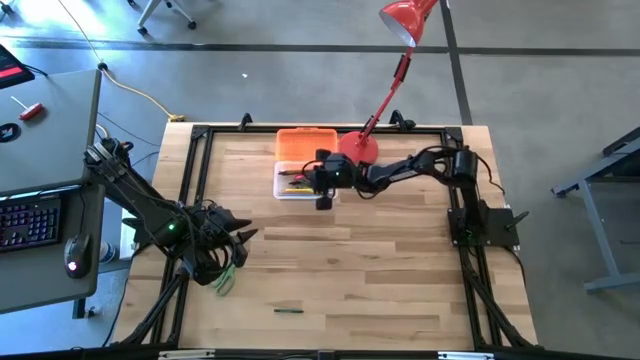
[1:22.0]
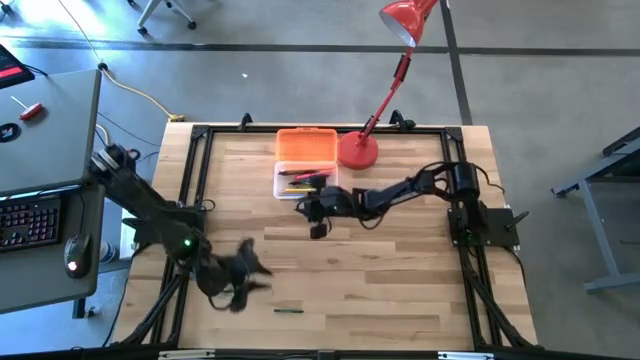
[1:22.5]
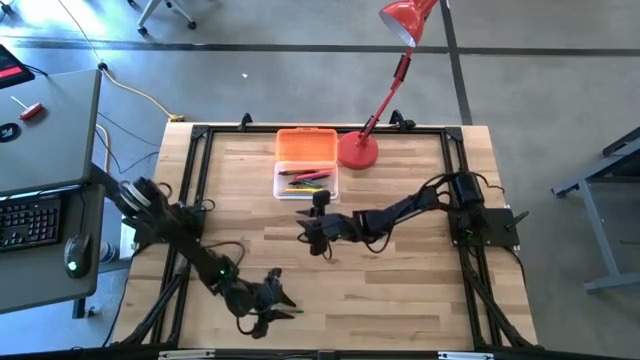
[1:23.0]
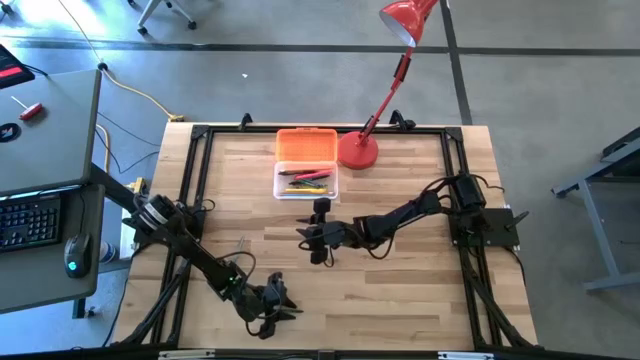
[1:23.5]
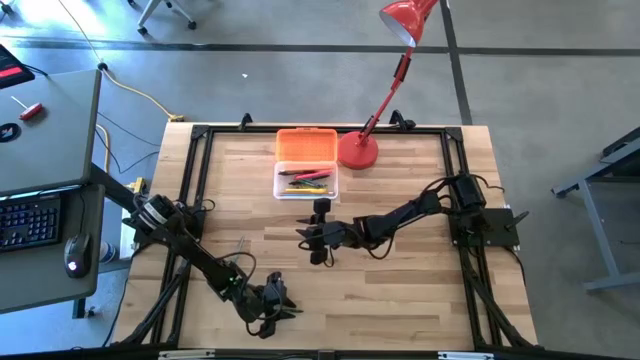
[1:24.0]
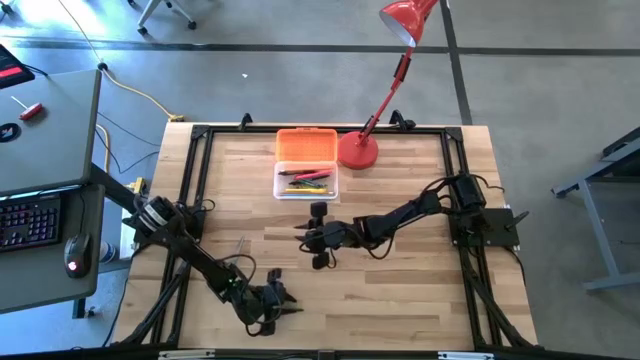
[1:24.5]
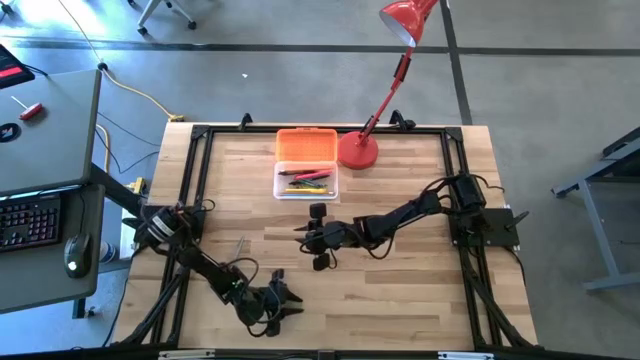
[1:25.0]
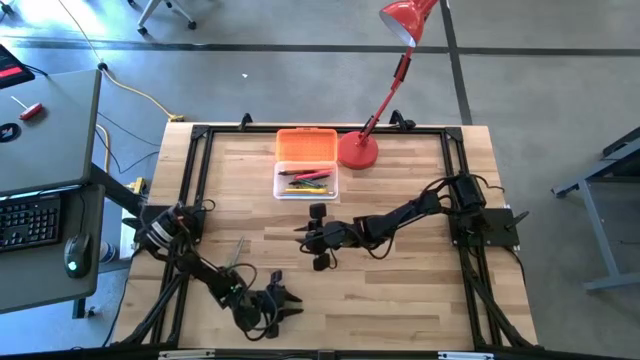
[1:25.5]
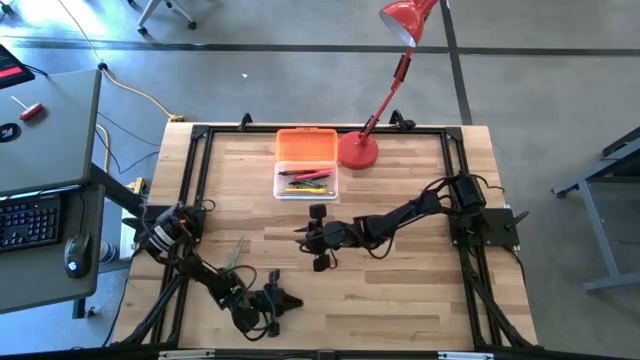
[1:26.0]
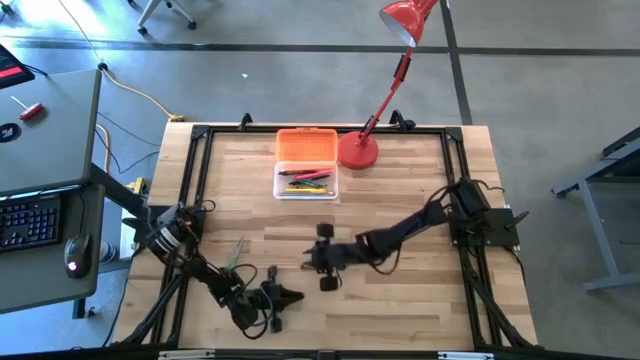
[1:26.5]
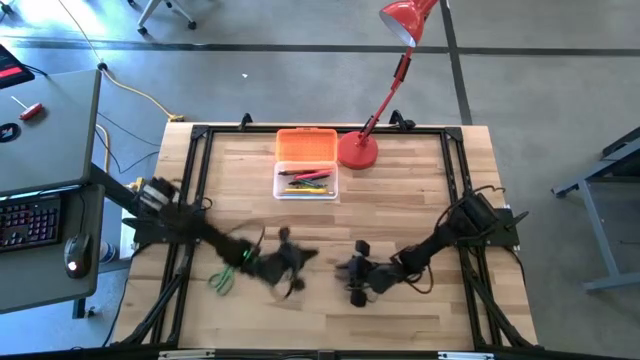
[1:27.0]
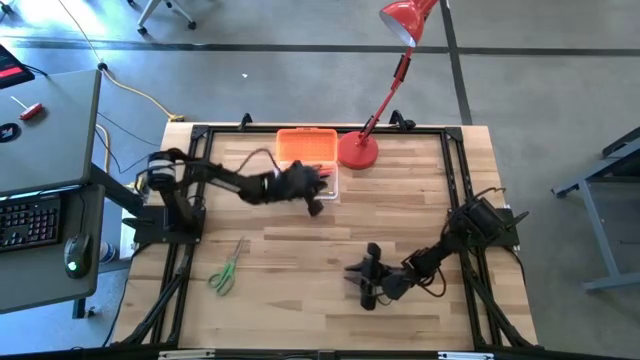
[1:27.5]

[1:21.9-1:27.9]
Task: Pick & place school supplies into a supply box
Put the dark green crayon into the orange supply box

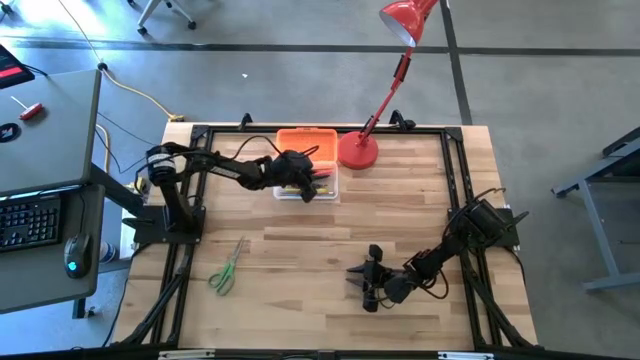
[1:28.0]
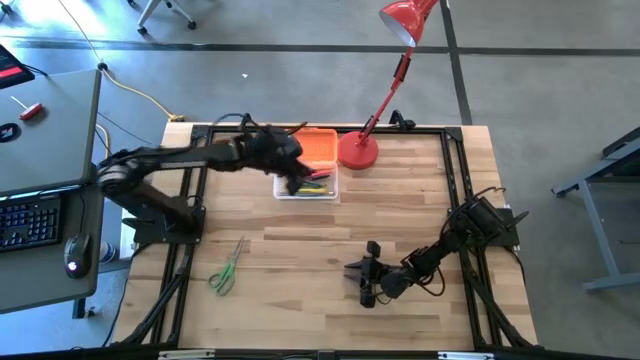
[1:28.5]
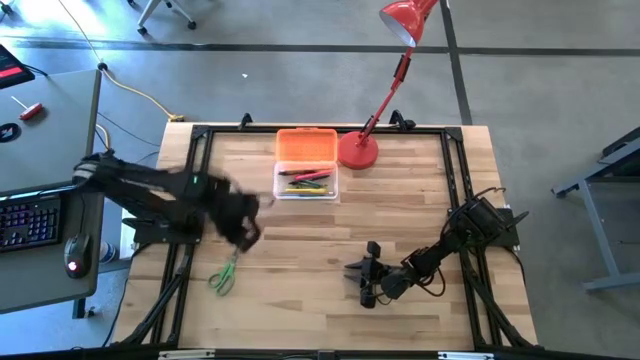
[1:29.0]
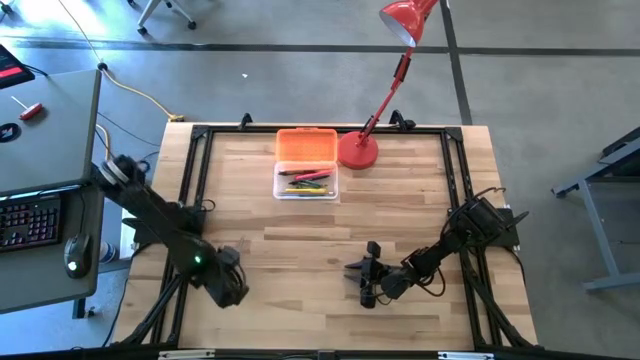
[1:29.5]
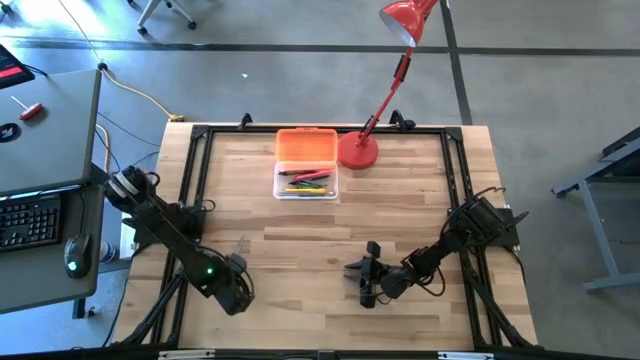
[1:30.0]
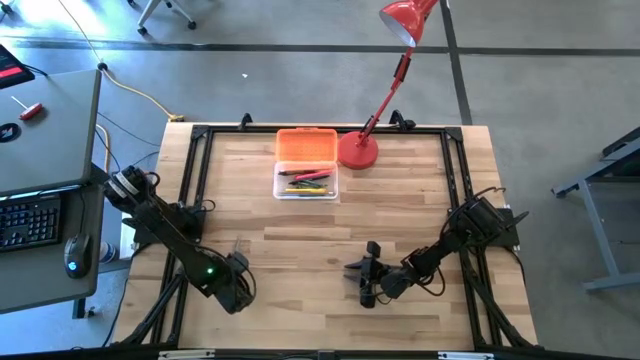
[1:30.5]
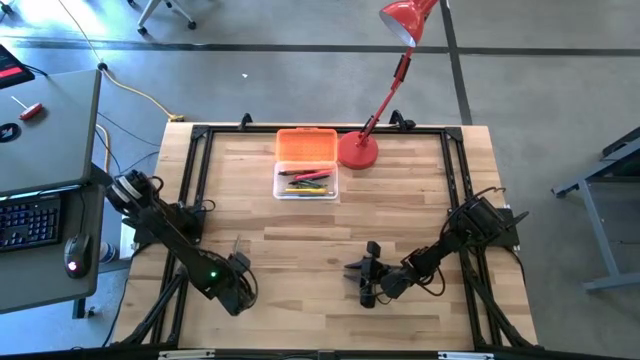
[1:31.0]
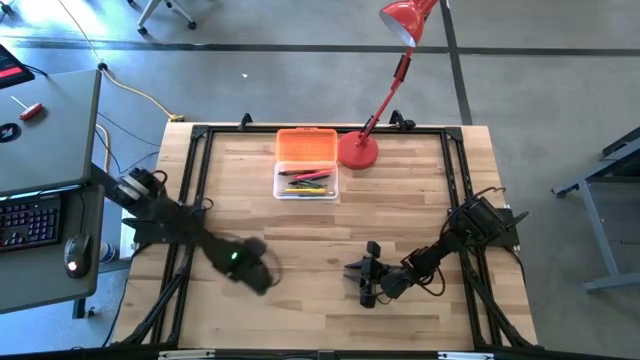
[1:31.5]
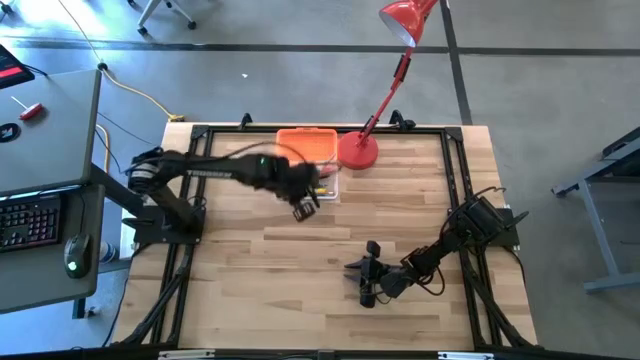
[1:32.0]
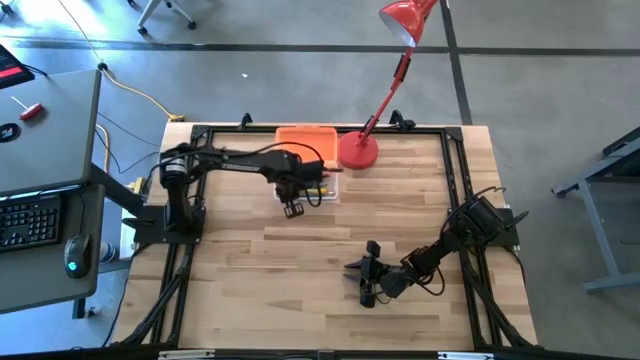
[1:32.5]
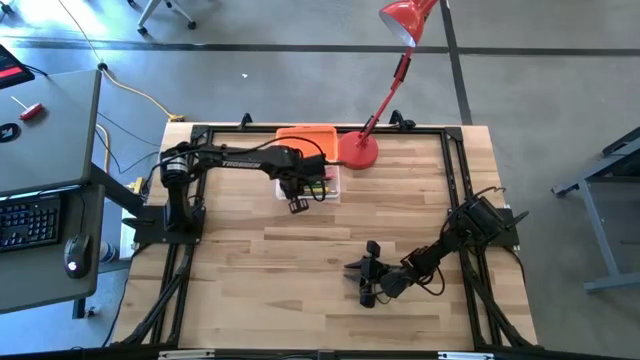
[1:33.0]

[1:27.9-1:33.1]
Put the green scissors into the orange supply box

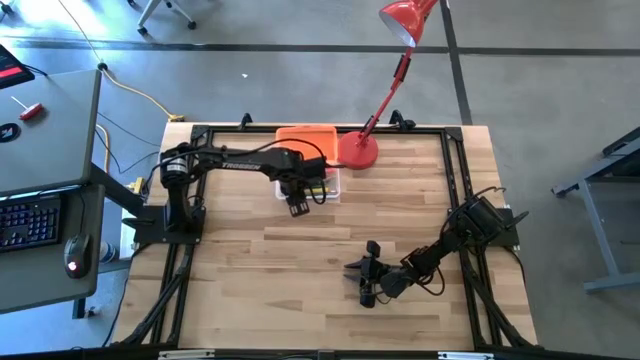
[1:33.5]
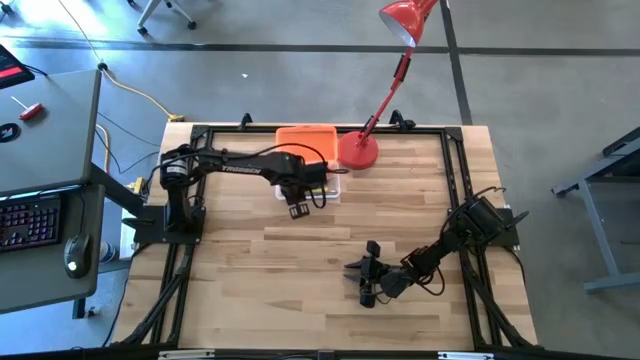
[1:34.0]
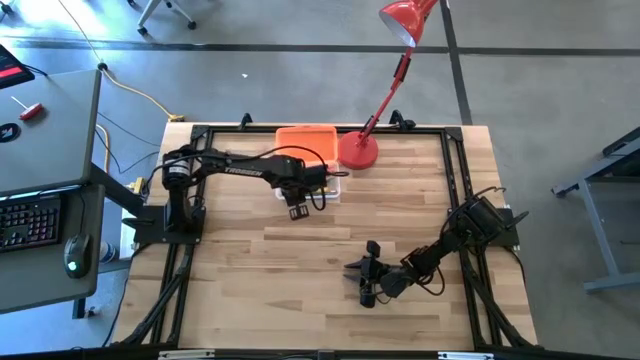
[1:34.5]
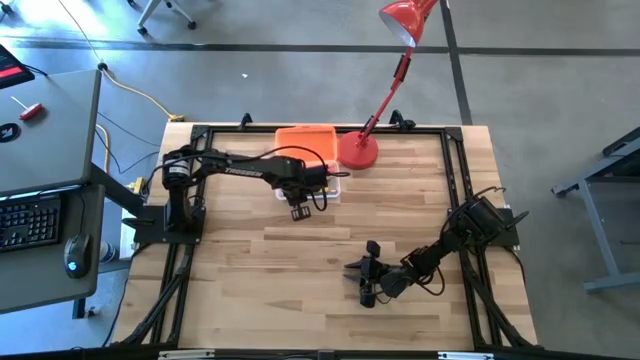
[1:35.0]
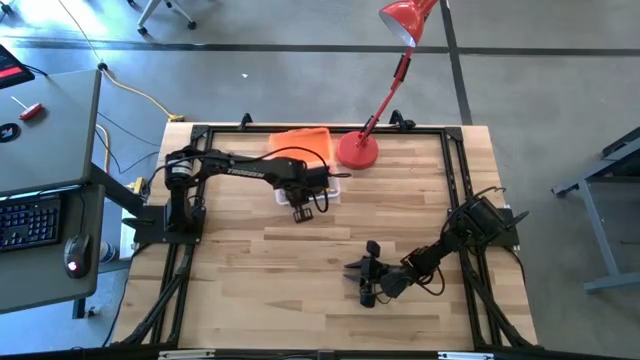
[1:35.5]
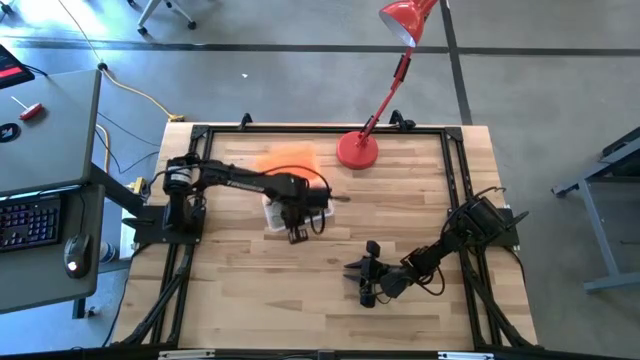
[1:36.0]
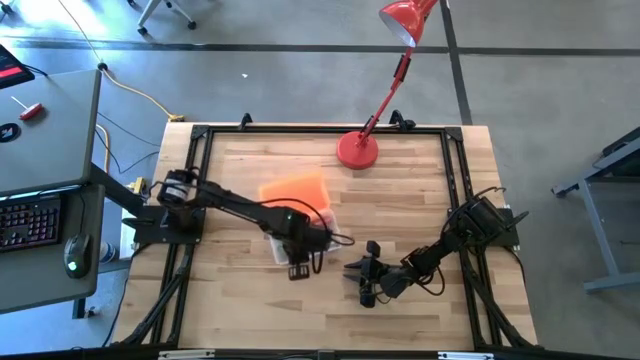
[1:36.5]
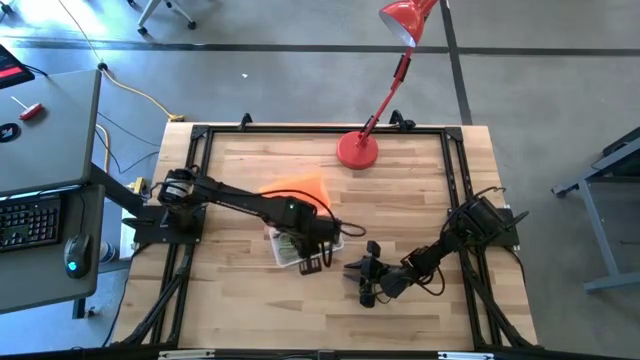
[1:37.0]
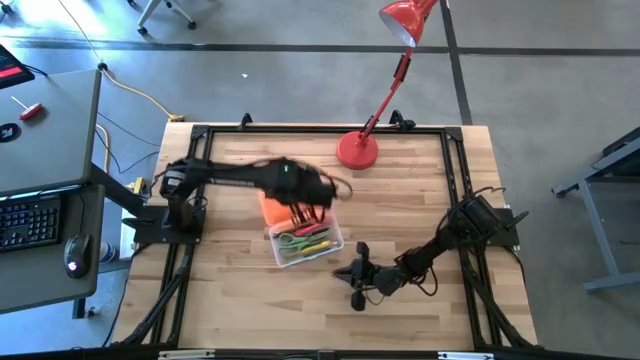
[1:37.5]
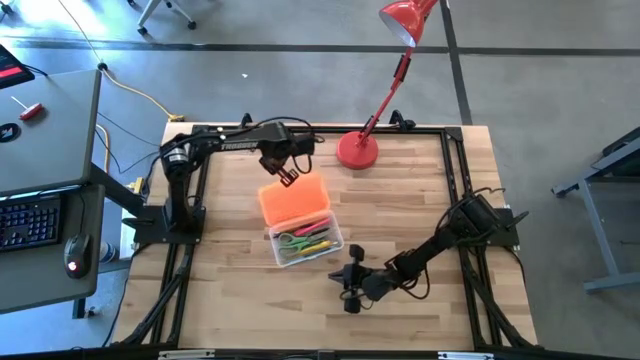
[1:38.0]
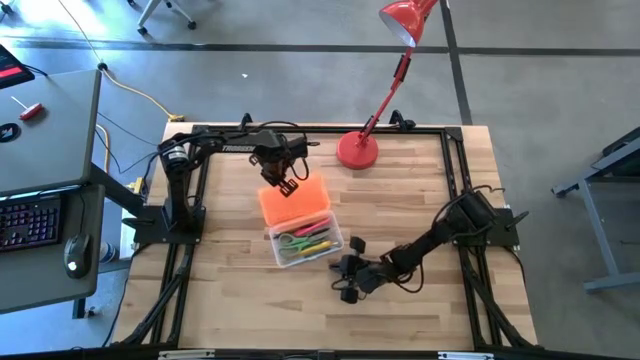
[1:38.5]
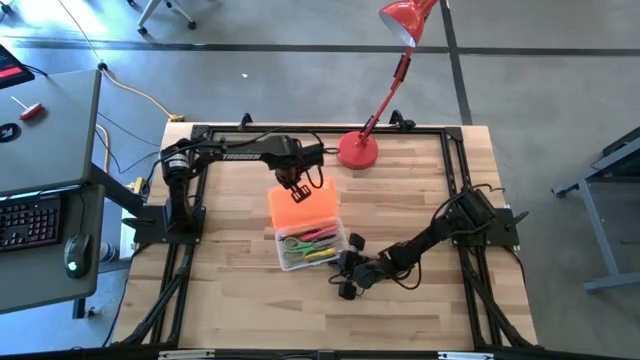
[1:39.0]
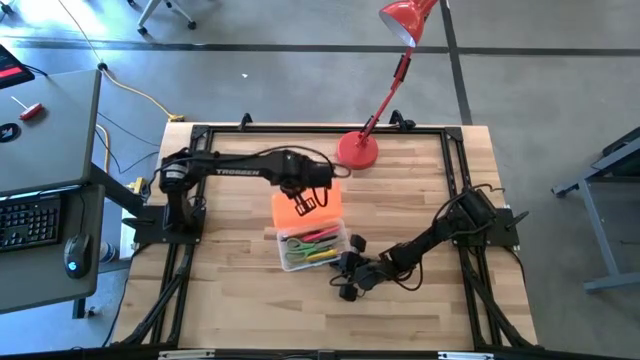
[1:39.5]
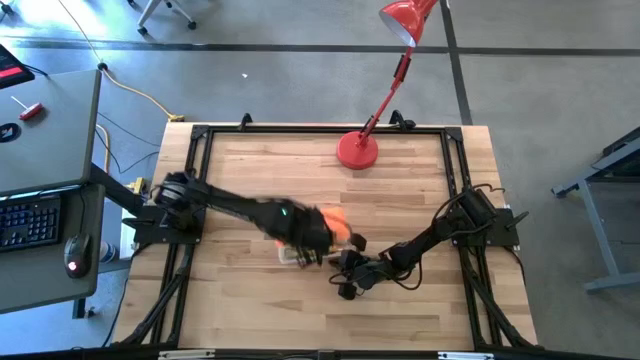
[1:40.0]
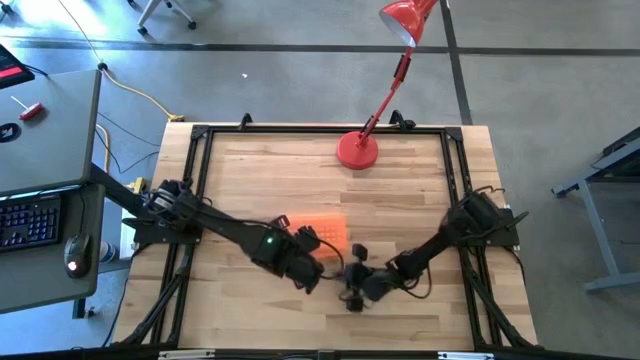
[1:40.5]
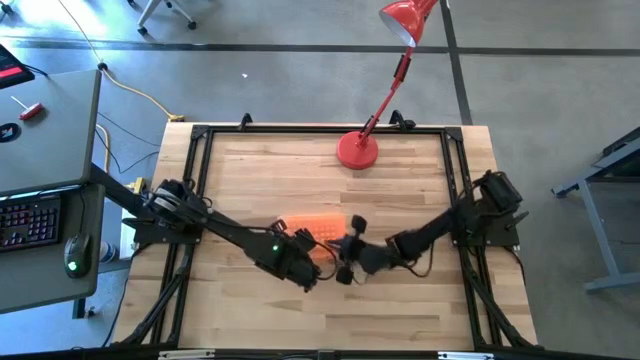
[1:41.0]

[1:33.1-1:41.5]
Close the orange supply box

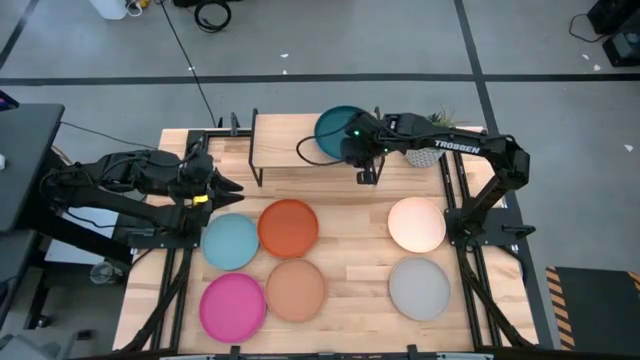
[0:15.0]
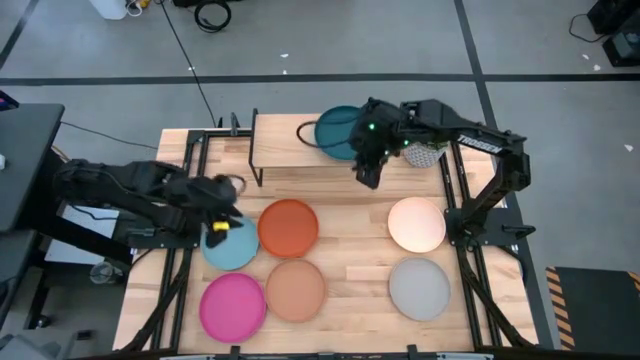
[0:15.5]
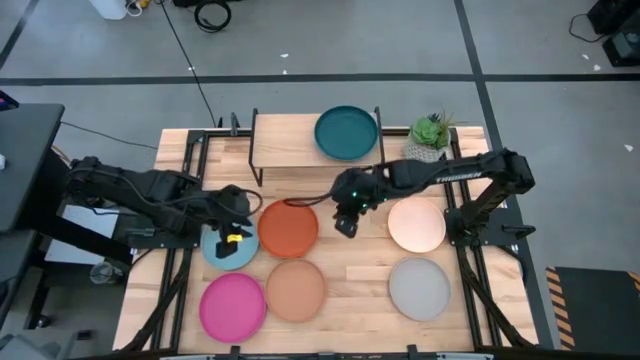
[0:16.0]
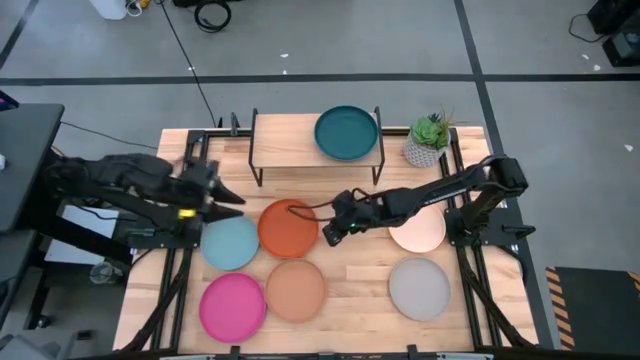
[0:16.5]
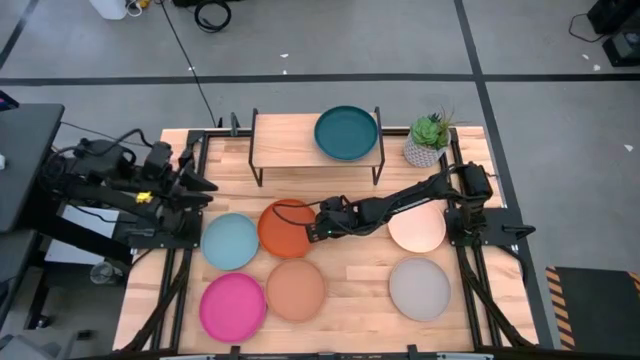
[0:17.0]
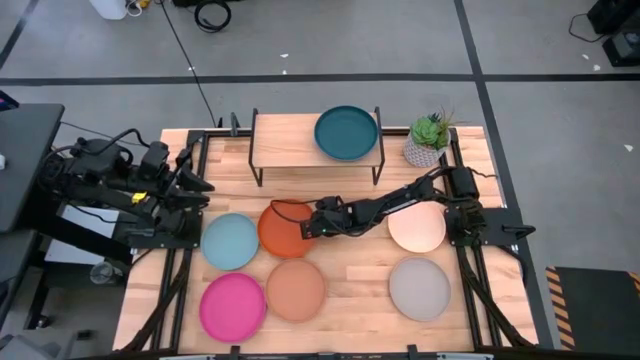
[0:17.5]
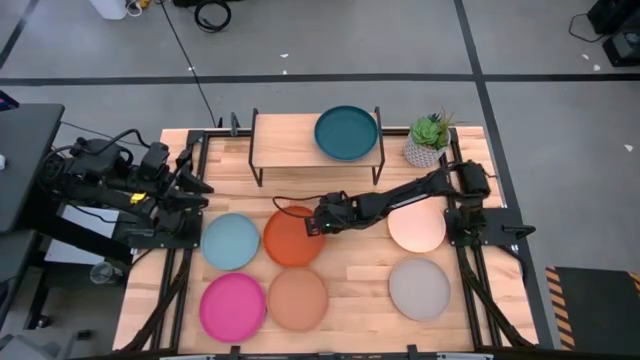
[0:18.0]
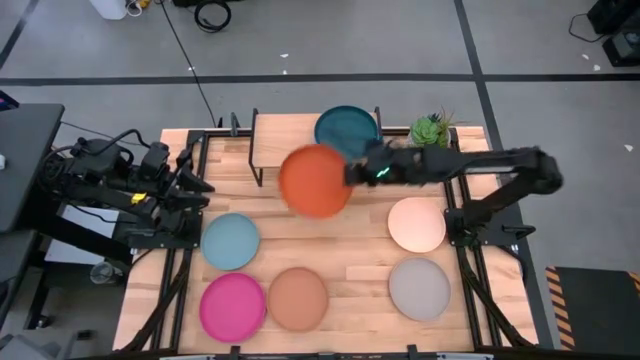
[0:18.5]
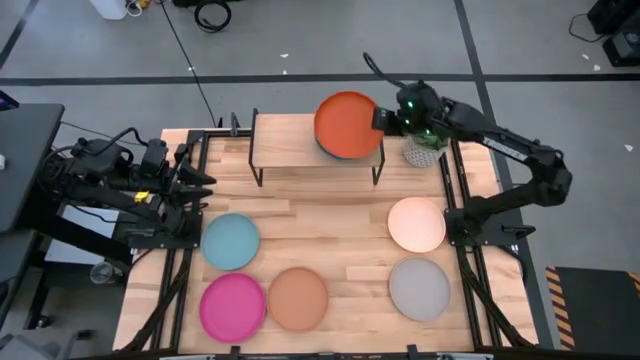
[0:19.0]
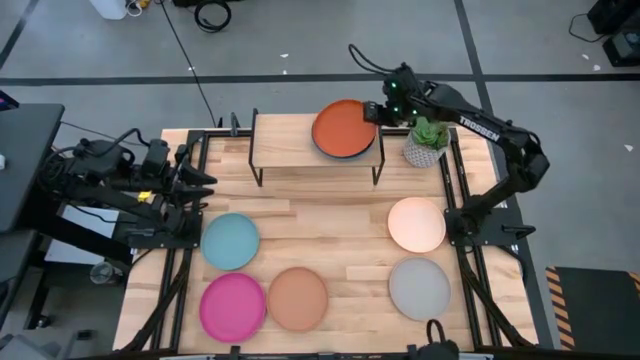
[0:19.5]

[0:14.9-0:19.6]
Task: Place and stack plates onto a shelf
Stack the orange plate into the dark blue plate on the shelf
